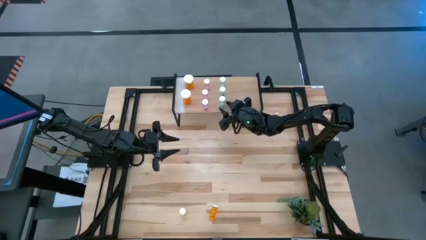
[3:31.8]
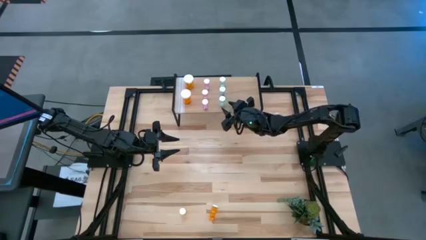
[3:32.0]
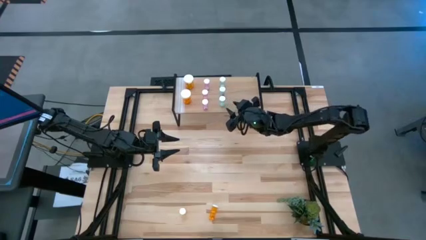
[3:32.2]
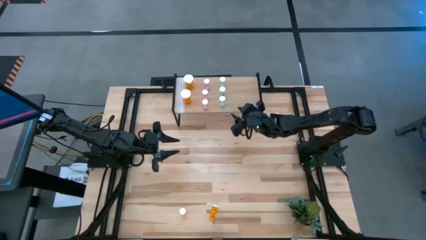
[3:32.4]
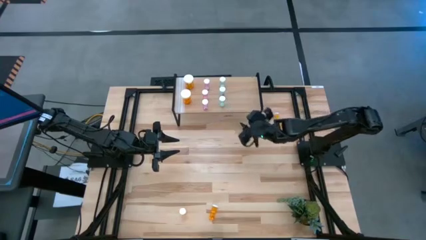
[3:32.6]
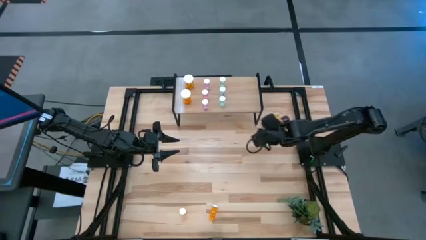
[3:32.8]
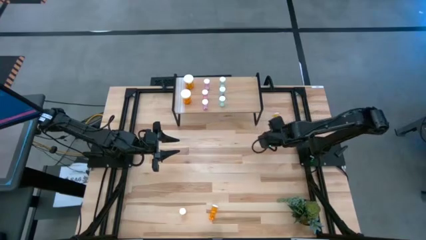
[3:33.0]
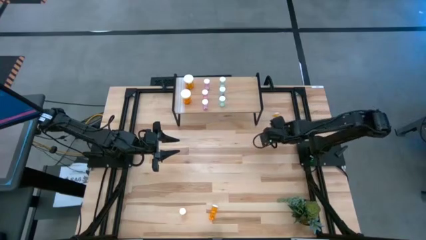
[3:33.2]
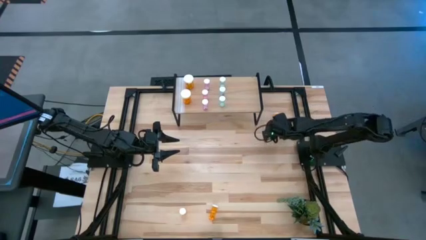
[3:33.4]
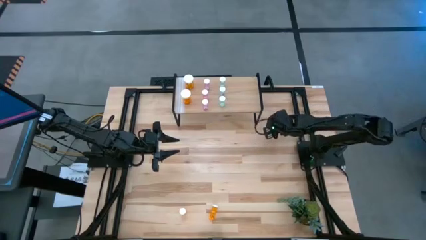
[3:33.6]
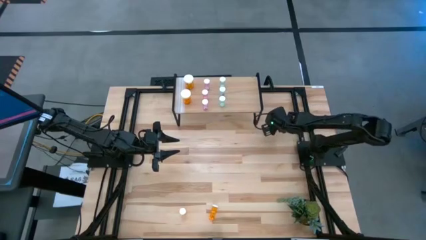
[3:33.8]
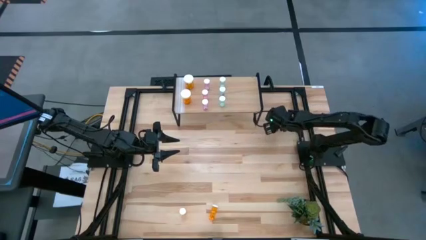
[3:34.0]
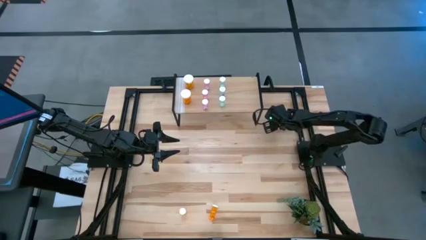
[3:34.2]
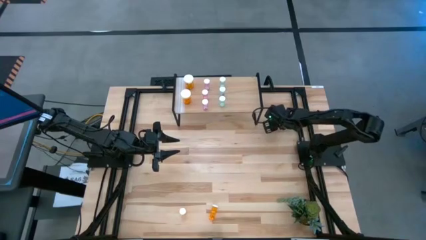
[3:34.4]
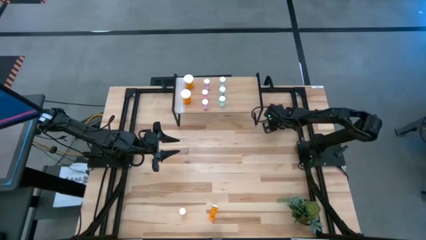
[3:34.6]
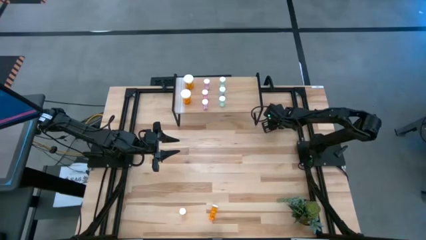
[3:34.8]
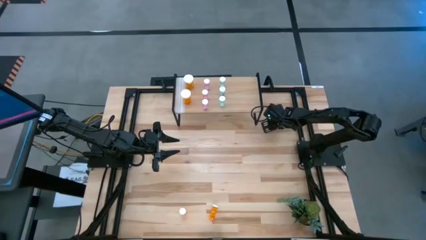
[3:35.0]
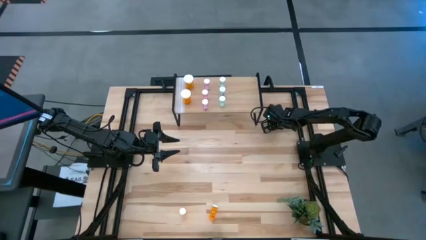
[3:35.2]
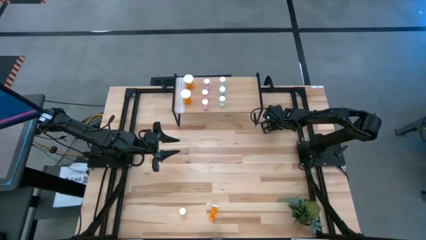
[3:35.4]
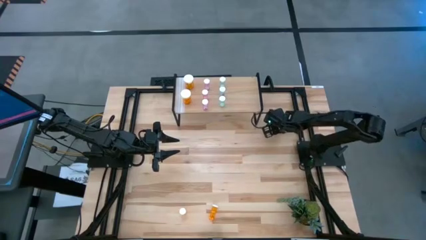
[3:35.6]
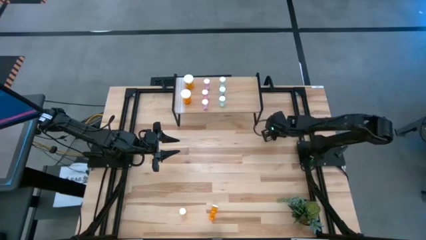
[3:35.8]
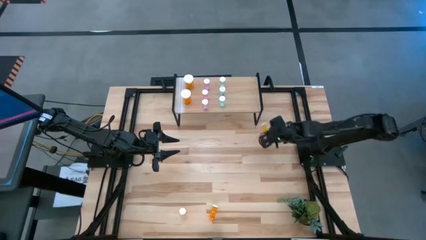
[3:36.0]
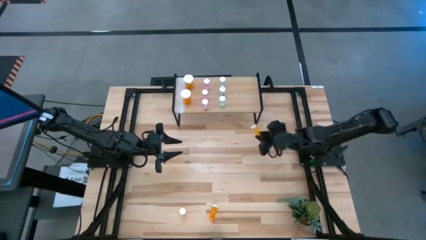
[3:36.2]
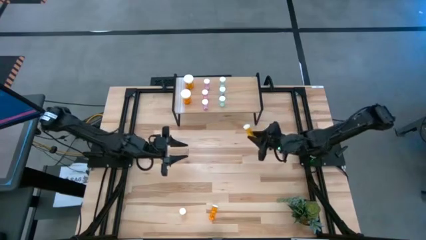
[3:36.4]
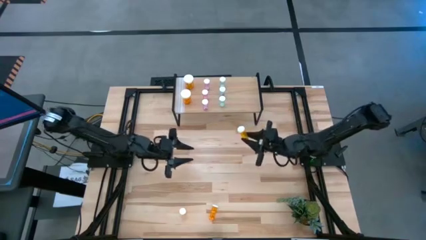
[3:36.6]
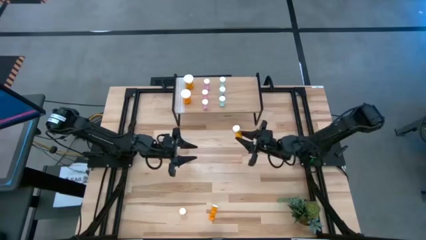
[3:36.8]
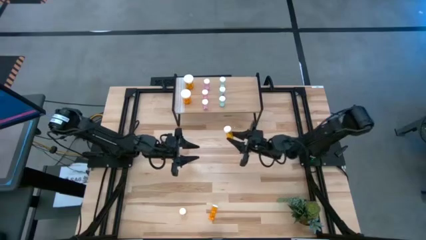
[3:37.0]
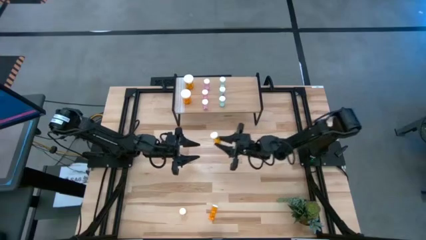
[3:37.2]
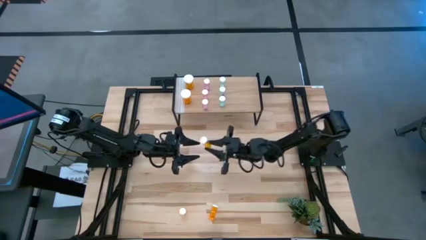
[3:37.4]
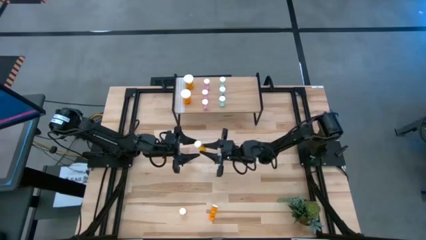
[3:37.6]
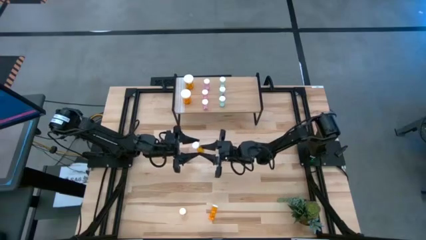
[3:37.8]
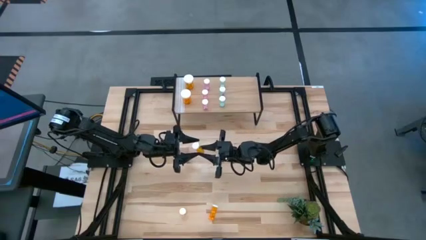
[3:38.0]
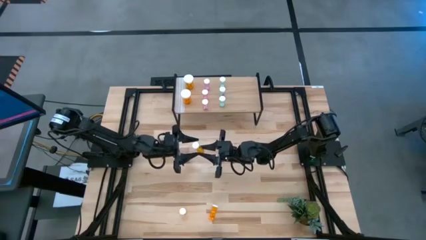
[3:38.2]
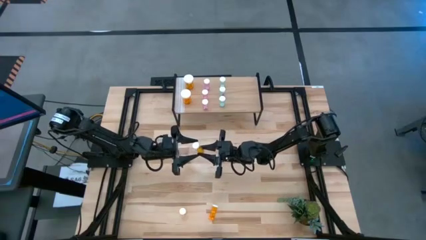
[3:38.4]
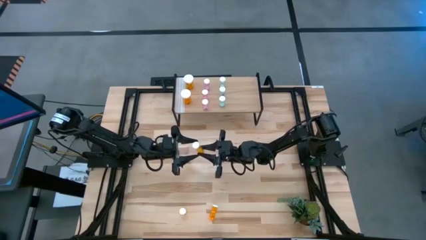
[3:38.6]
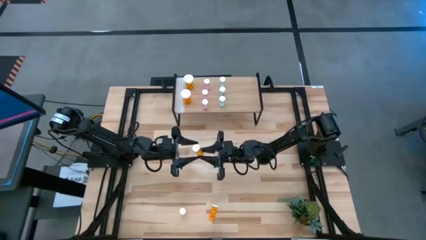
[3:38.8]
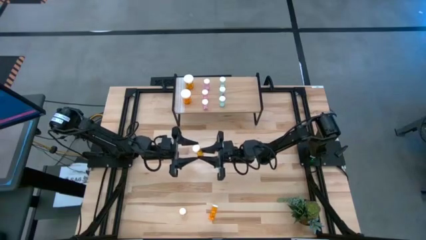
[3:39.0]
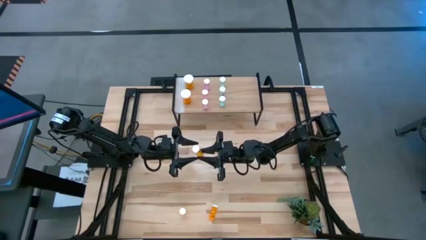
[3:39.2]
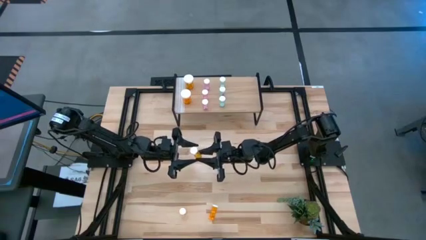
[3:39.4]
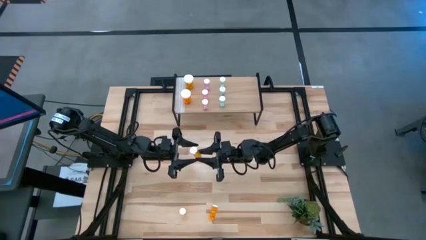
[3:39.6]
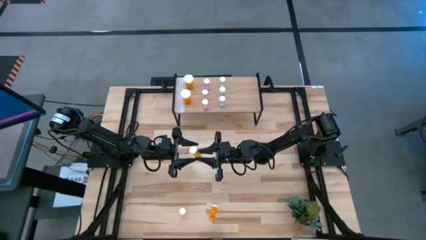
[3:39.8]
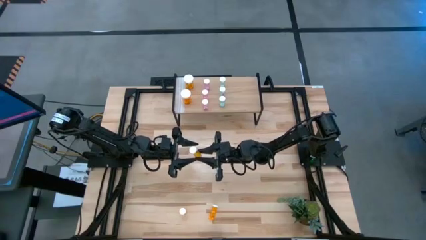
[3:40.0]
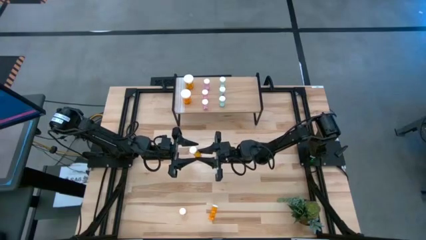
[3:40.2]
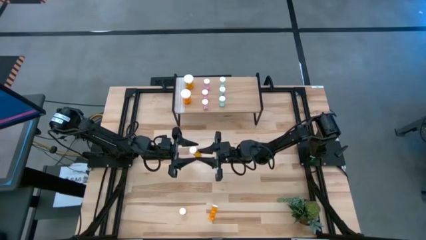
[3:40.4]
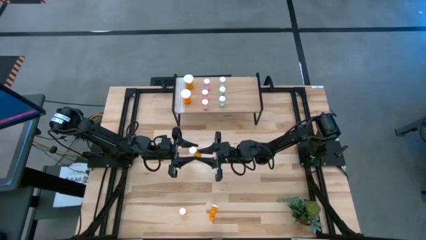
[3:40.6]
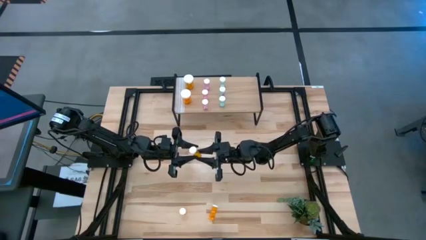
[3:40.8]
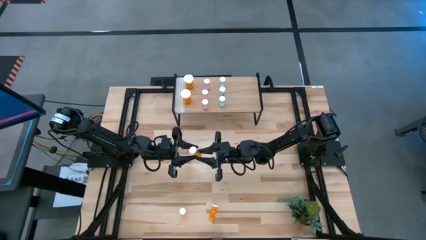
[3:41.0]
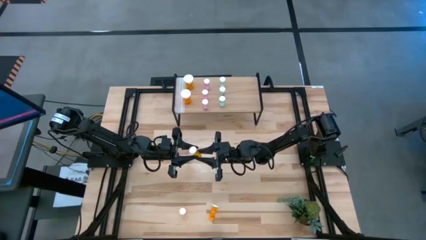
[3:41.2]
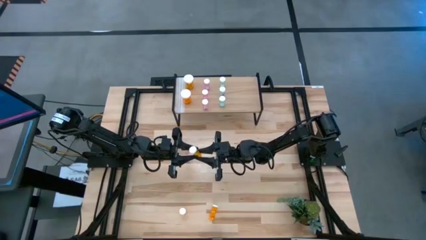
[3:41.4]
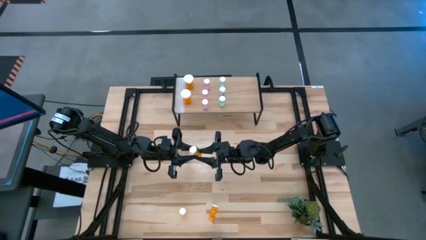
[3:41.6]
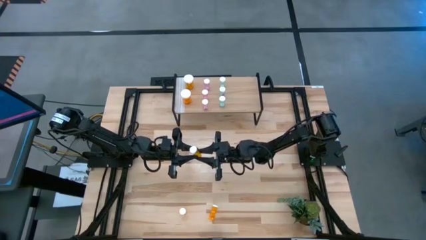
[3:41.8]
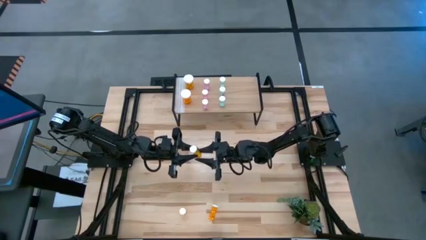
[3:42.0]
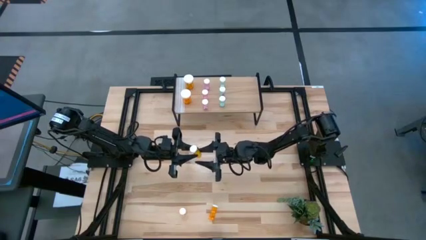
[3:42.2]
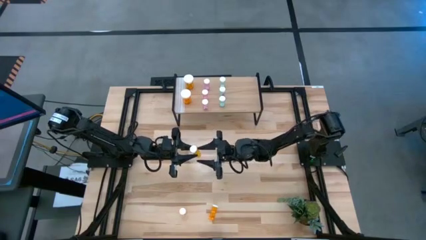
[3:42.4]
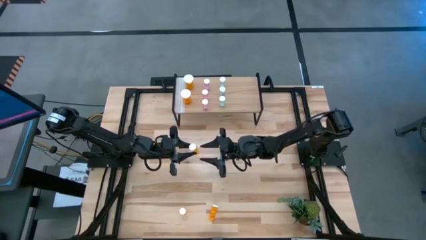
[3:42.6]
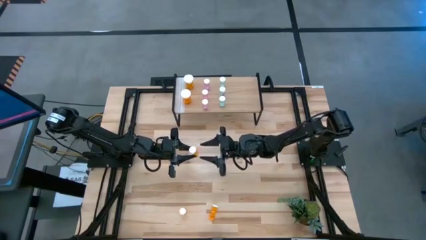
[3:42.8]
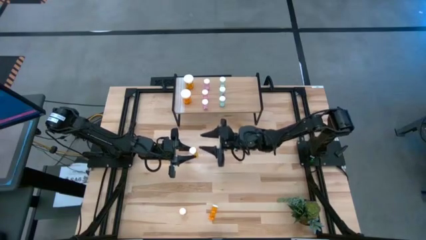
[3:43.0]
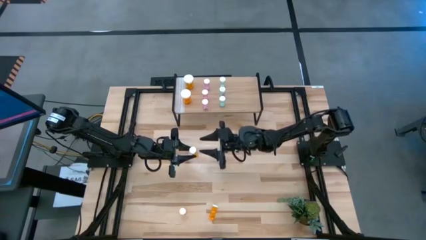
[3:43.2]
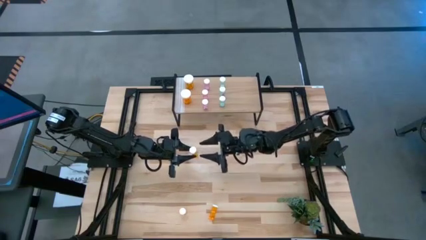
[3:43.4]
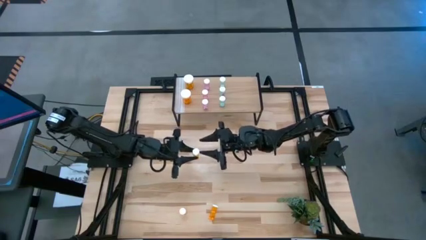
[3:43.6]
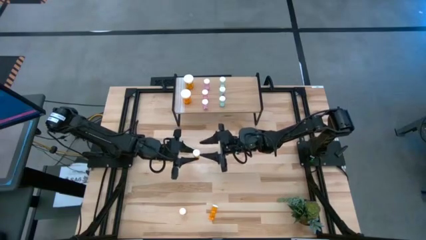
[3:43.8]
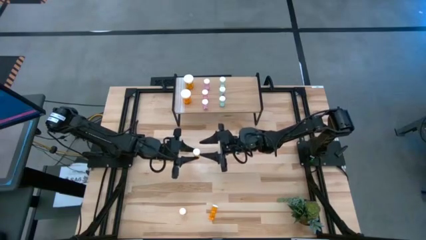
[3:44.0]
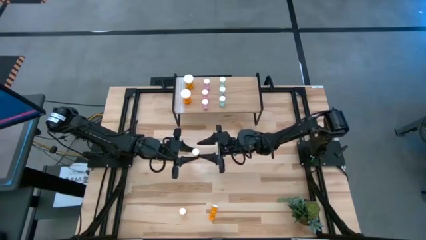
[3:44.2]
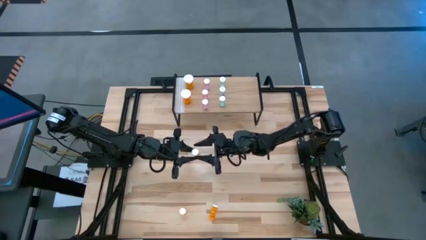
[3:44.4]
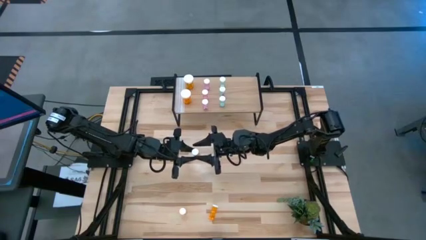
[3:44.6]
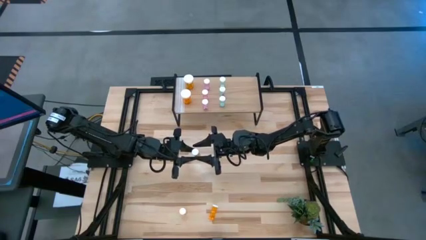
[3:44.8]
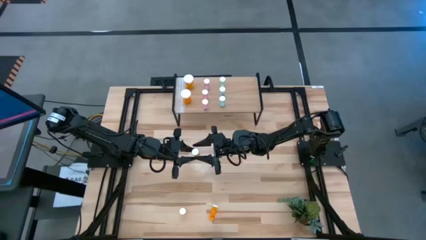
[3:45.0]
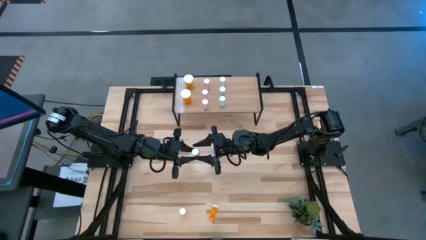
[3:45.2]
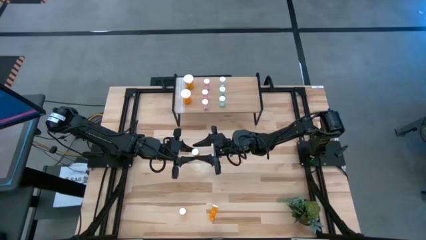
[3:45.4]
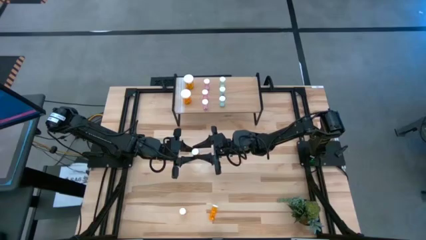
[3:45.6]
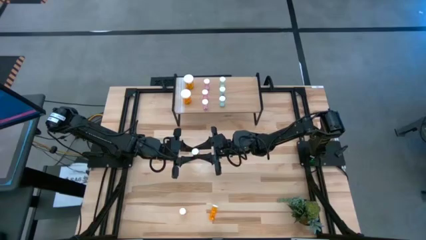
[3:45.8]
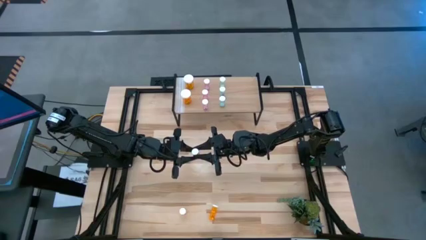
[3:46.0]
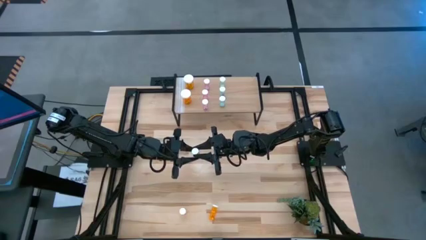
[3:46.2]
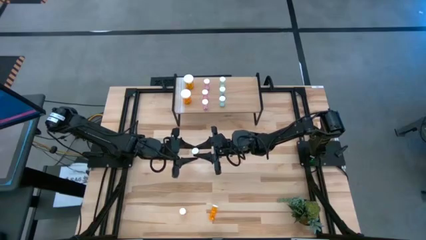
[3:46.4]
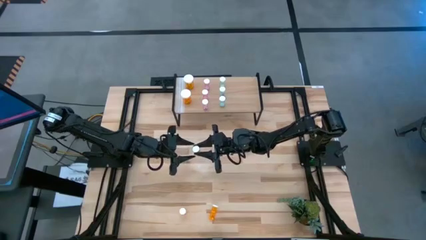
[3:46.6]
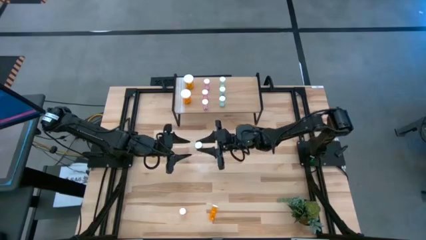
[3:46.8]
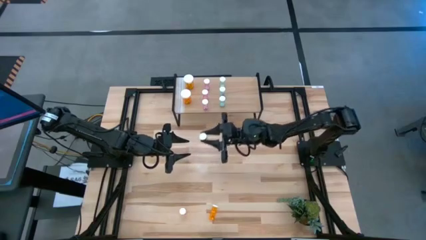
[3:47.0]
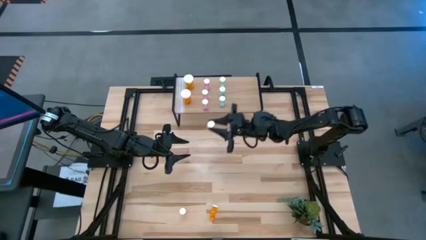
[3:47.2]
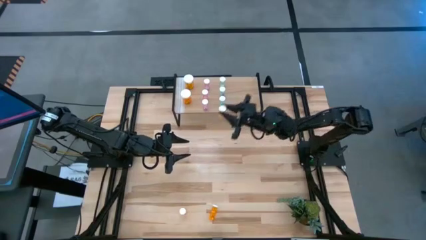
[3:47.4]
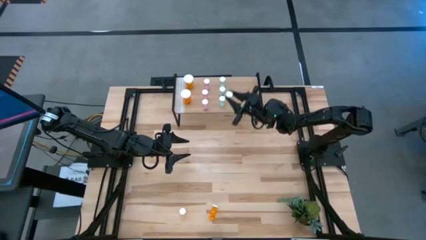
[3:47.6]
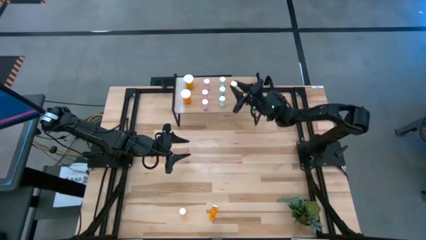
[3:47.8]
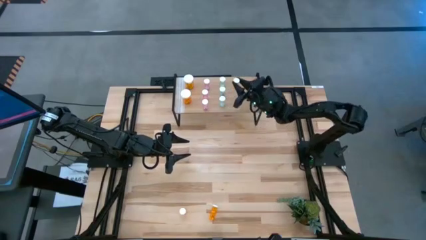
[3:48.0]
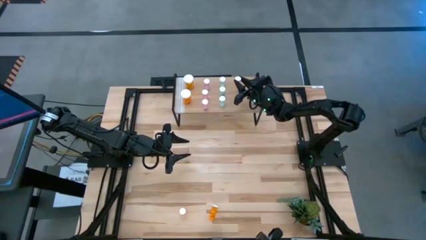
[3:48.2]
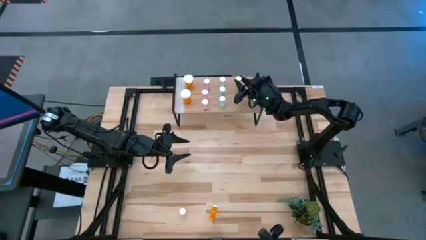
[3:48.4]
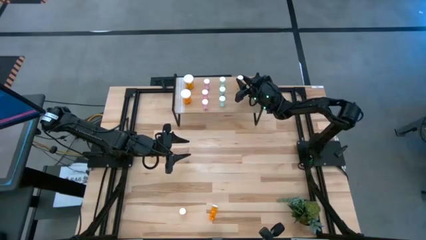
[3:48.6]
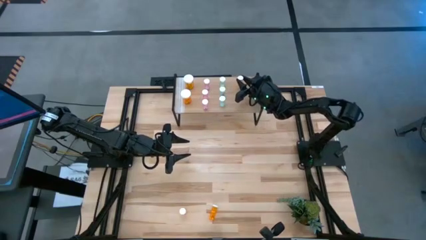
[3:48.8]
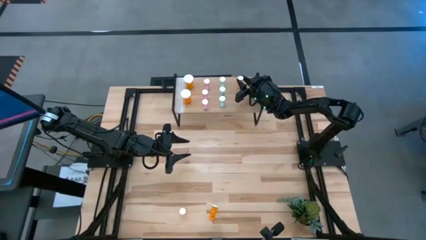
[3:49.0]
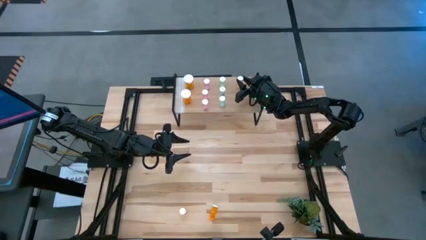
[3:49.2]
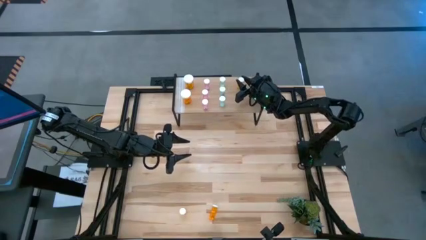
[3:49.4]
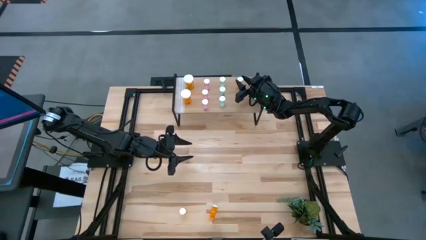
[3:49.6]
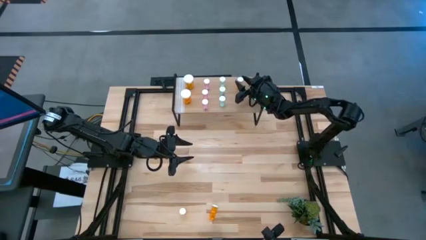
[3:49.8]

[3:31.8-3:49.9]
Task: Pick and place medicine bottles onto shelf by color
Put the top small orange pill bottle on the shelf
